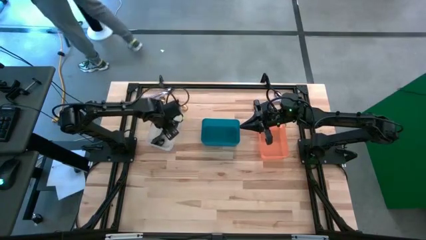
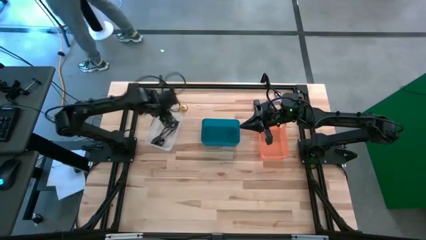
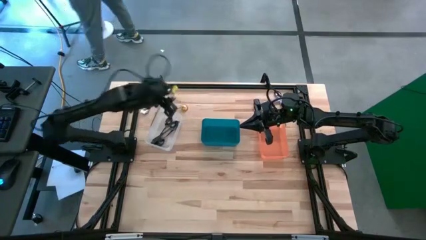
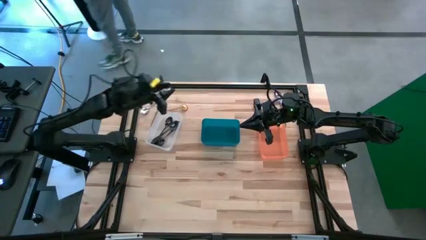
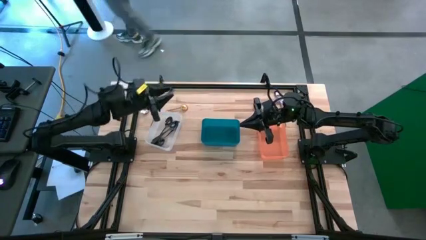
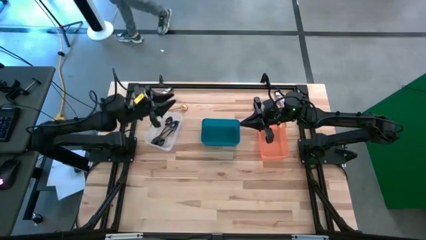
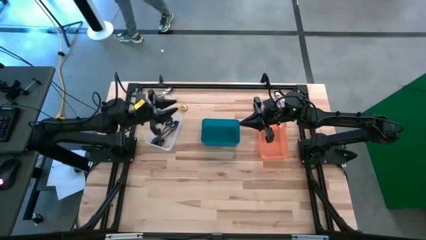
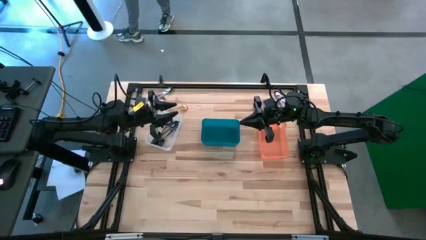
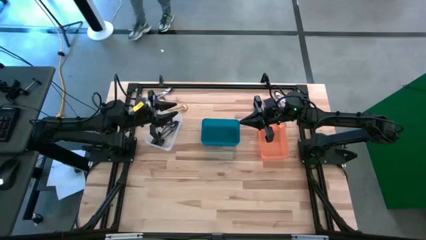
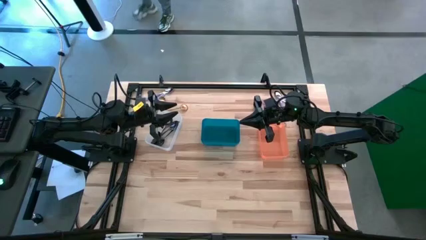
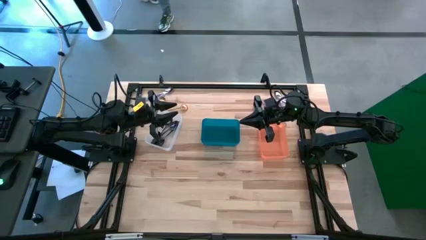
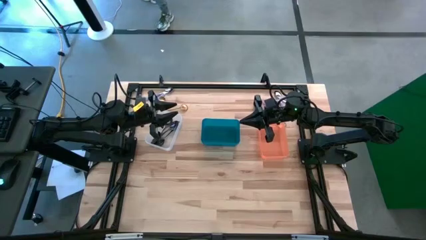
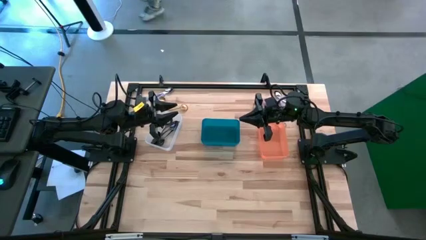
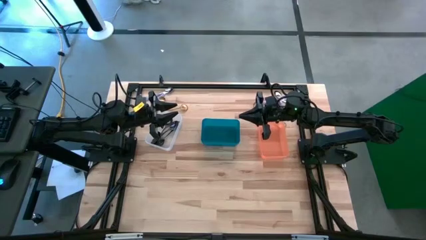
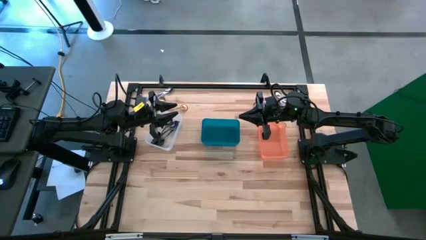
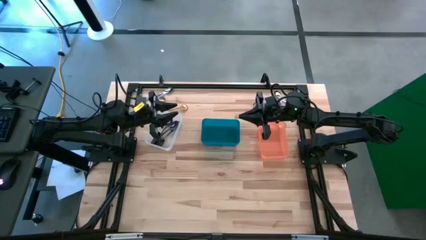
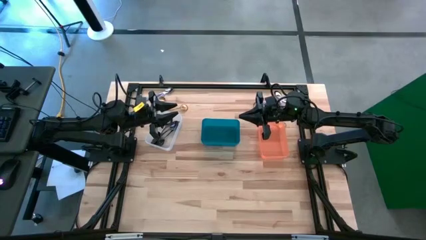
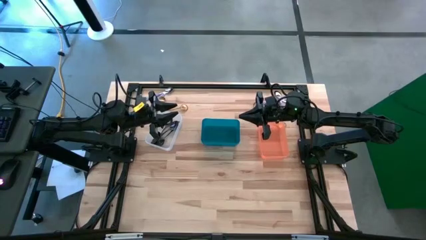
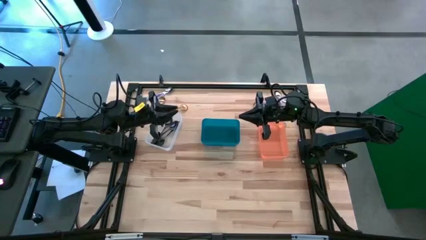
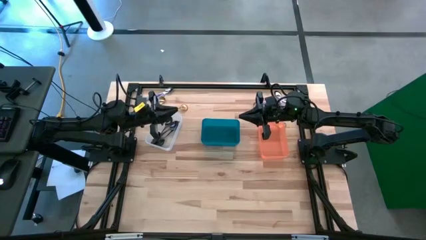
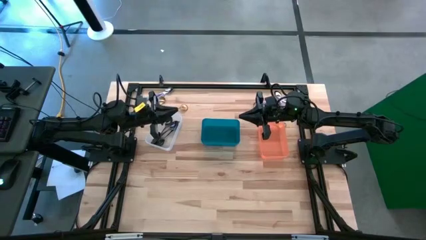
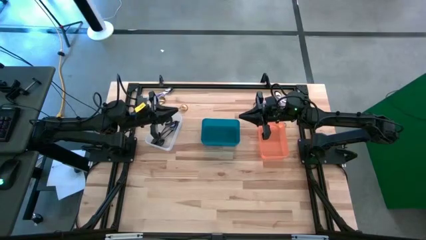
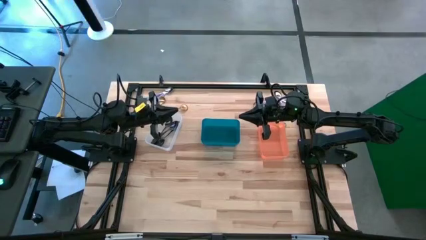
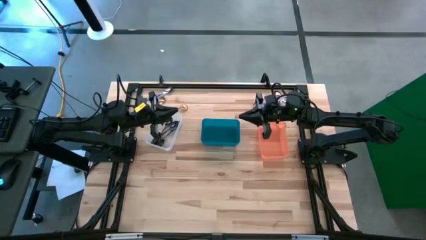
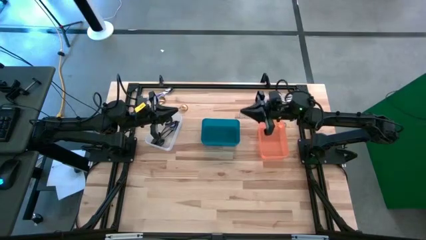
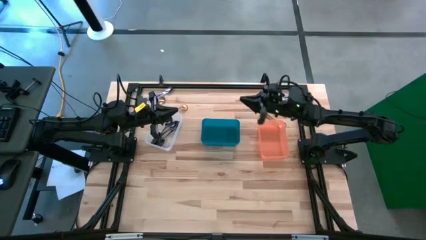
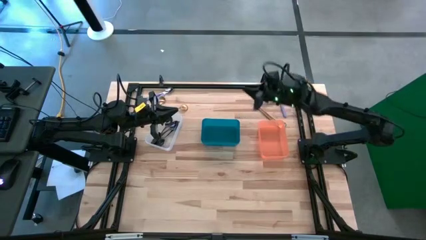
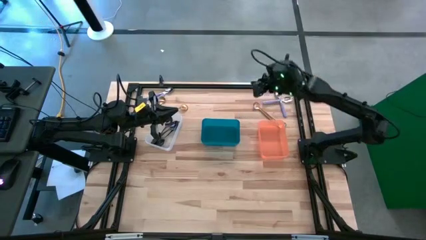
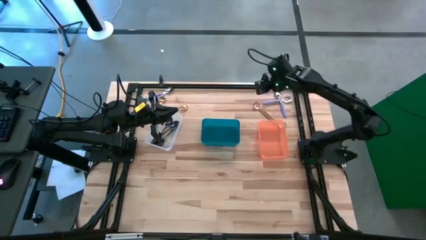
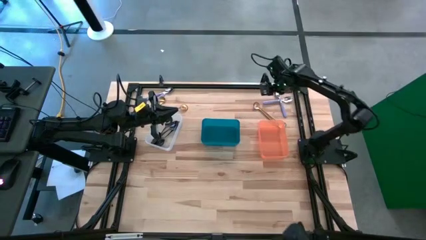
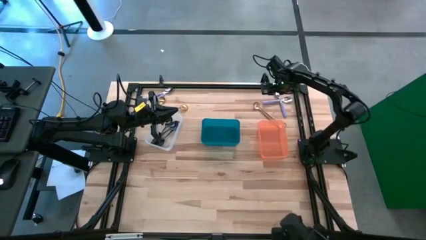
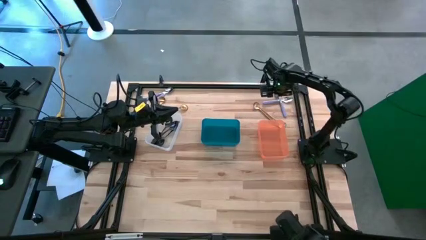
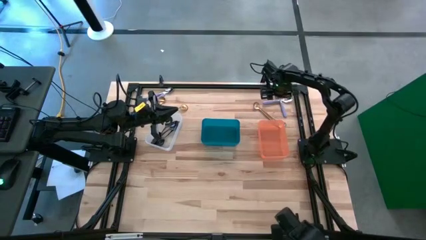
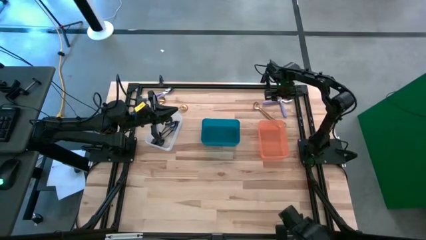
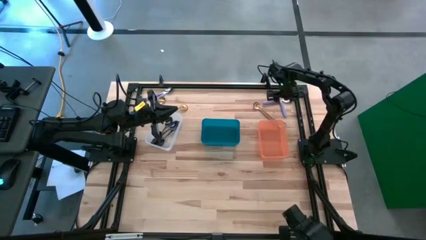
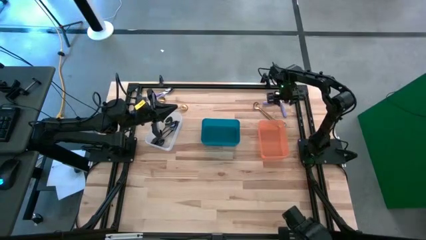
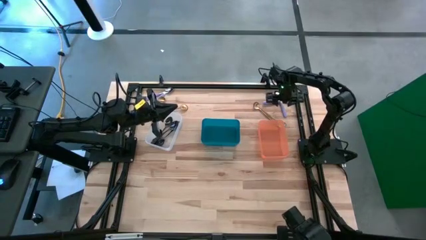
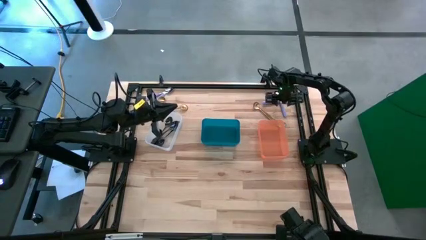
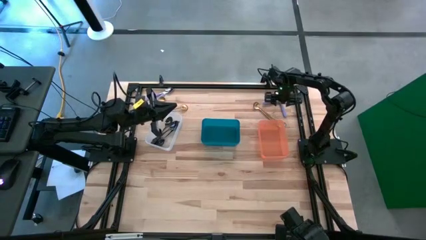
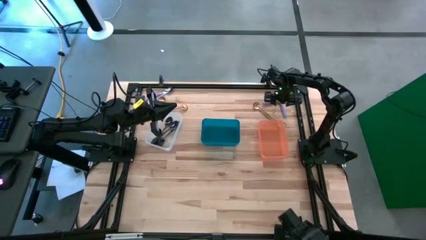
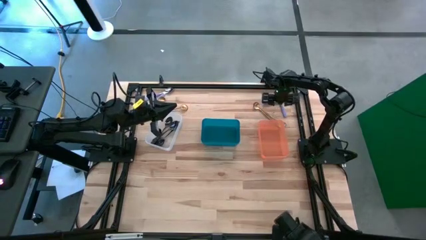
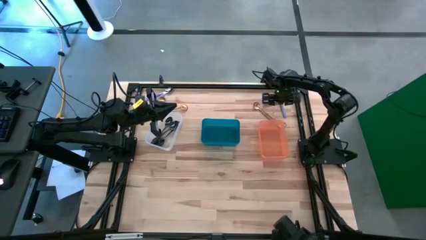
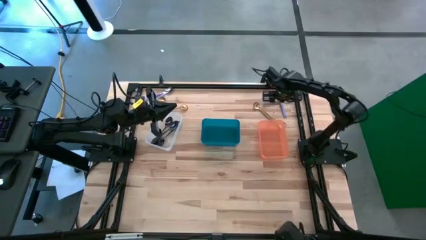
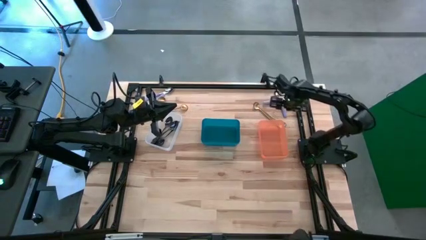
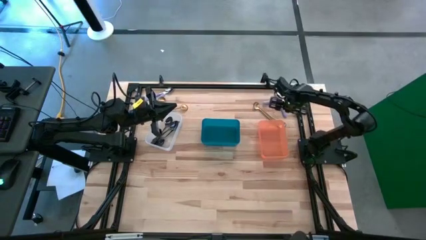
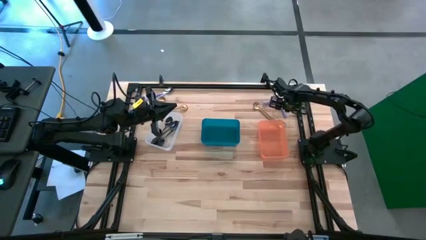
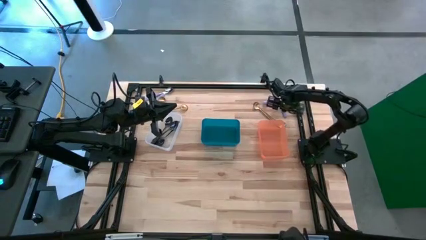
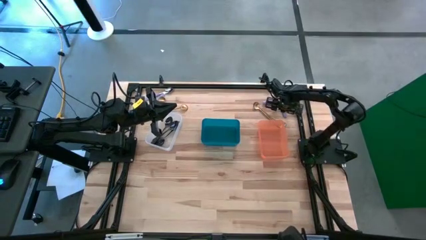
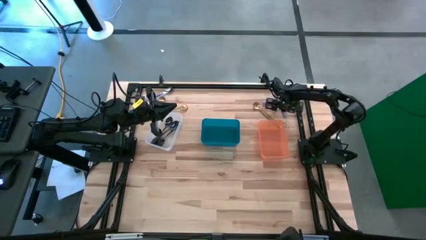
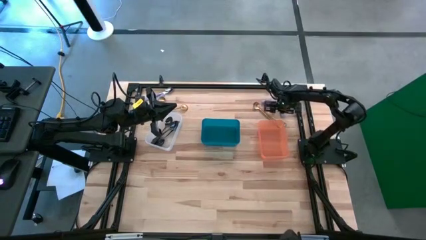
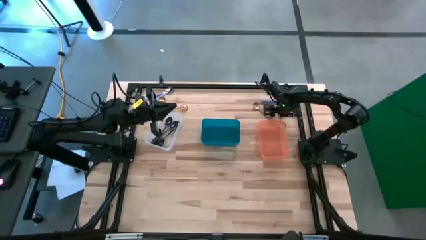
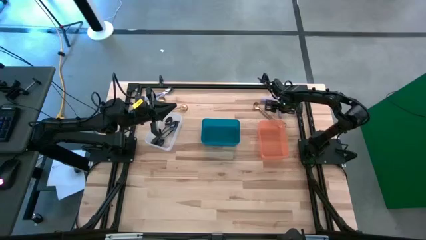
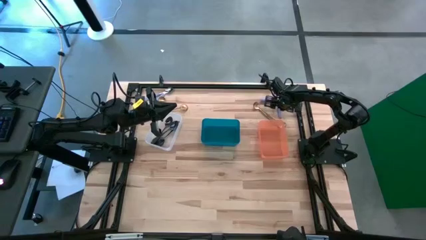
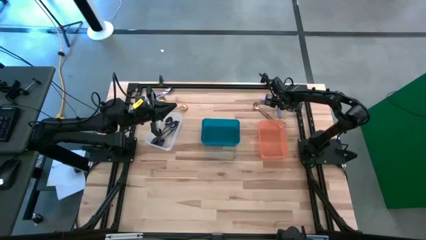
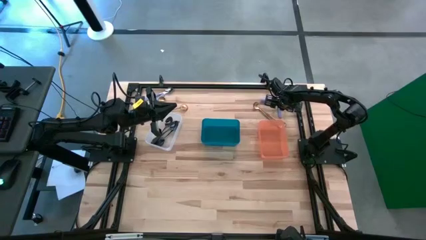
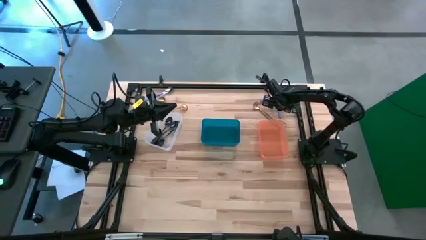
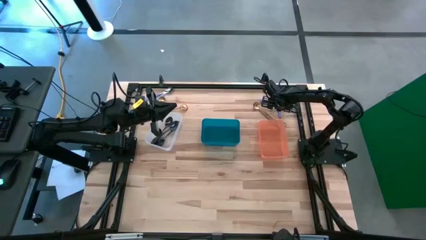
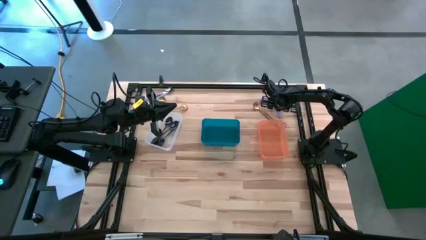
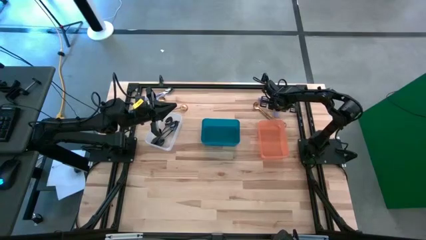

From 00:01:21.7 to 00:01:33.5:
Task: Sort silverware by color (type)
Put the purple spoon into the blue bin
